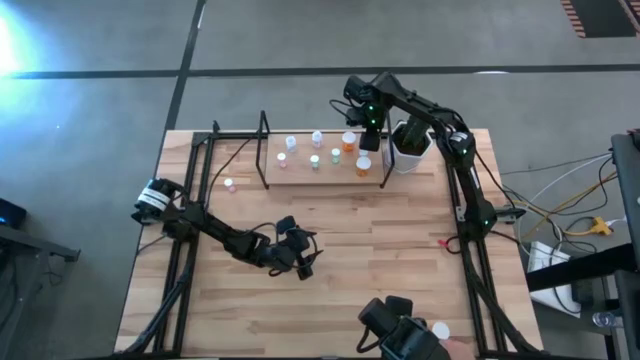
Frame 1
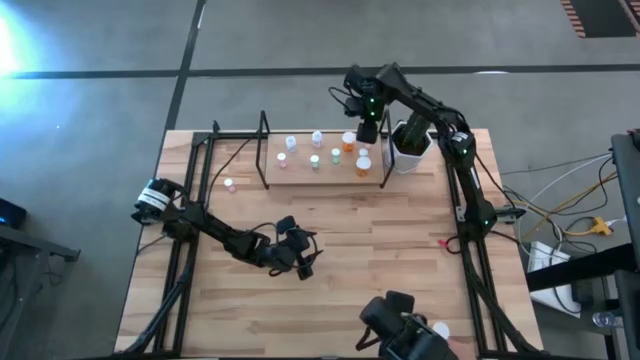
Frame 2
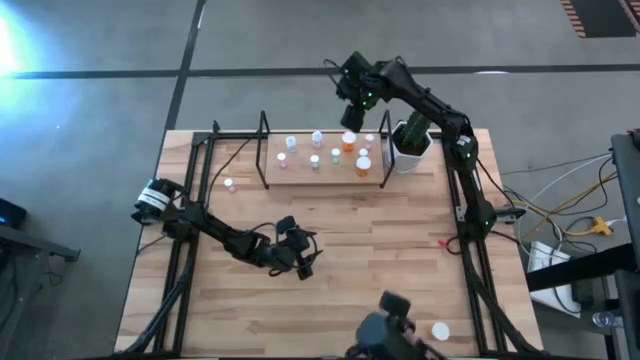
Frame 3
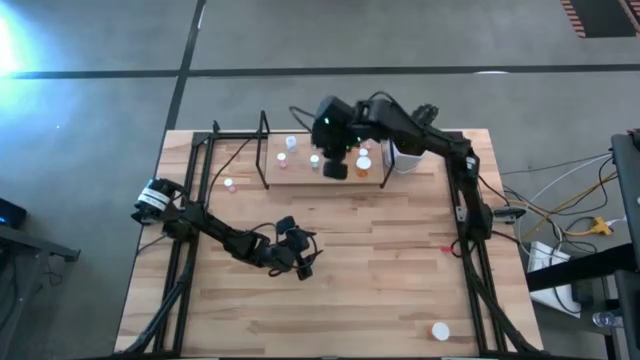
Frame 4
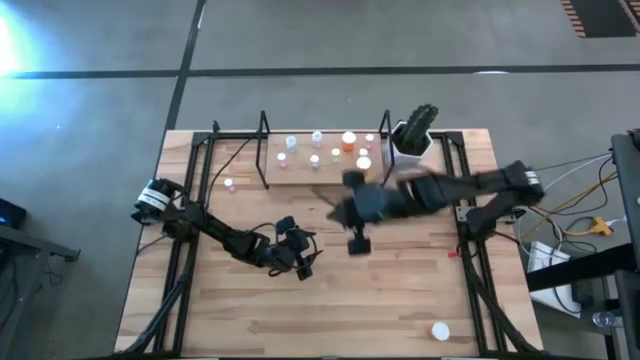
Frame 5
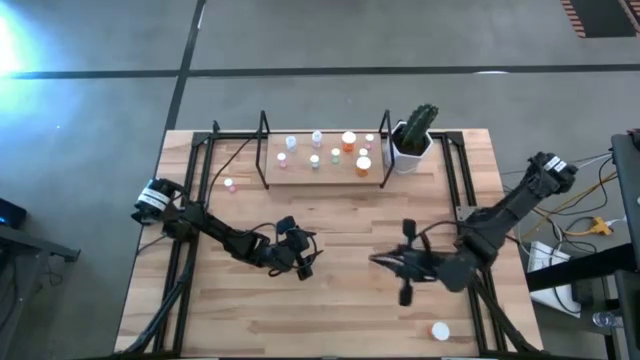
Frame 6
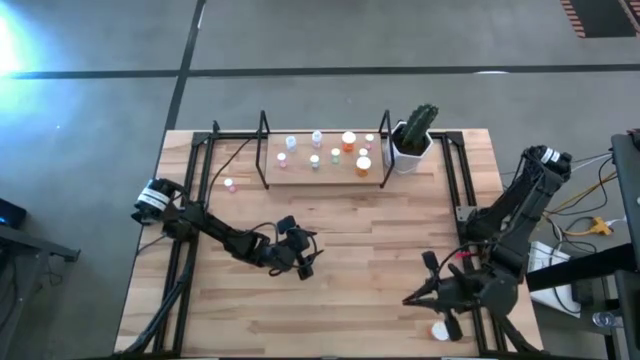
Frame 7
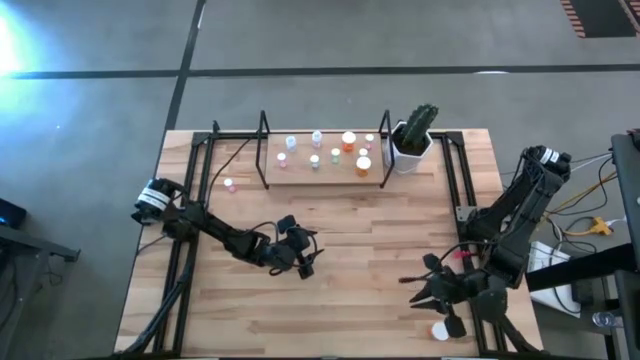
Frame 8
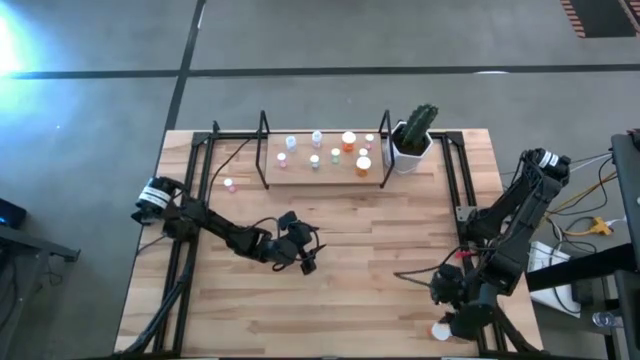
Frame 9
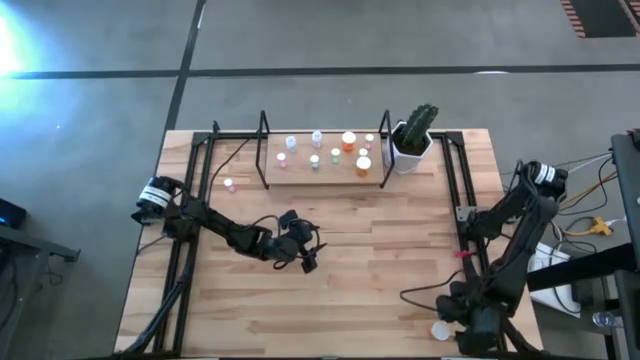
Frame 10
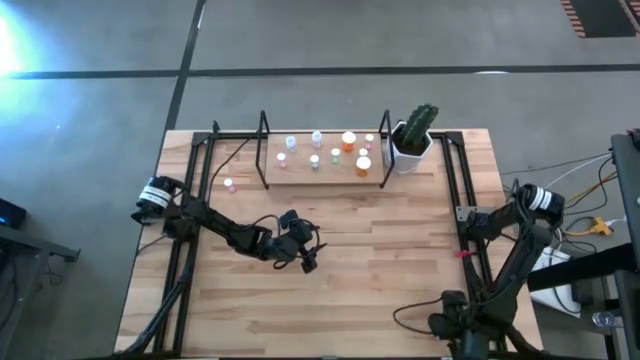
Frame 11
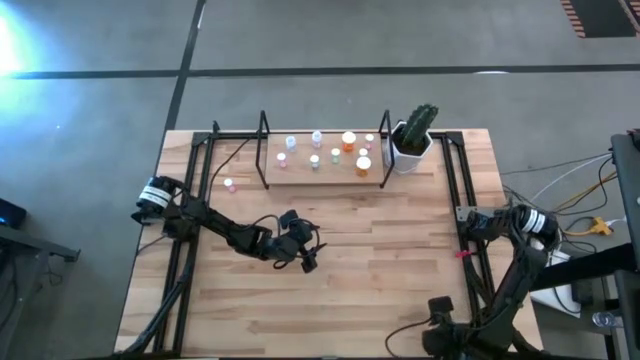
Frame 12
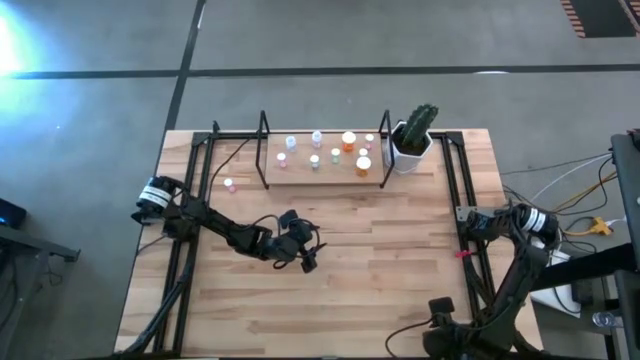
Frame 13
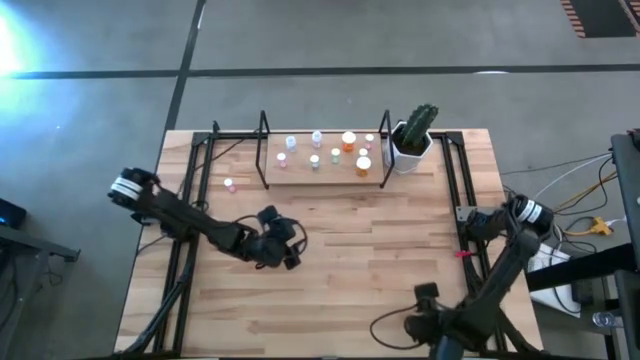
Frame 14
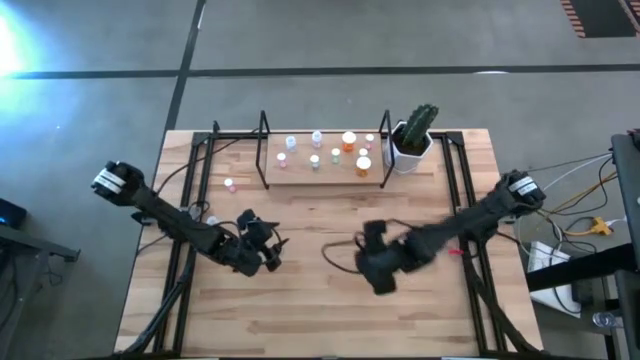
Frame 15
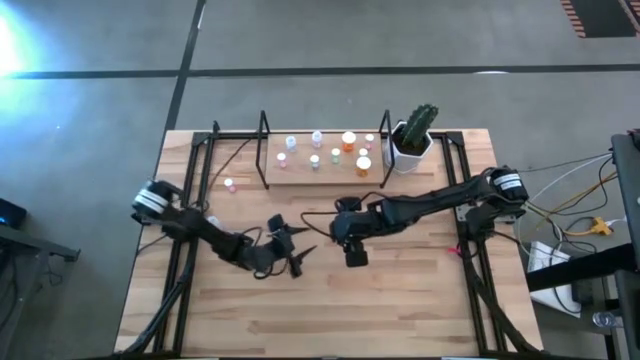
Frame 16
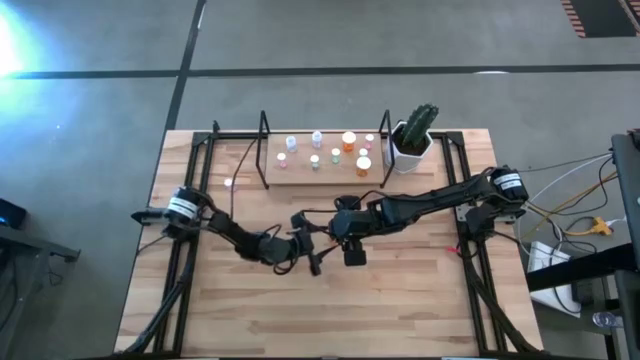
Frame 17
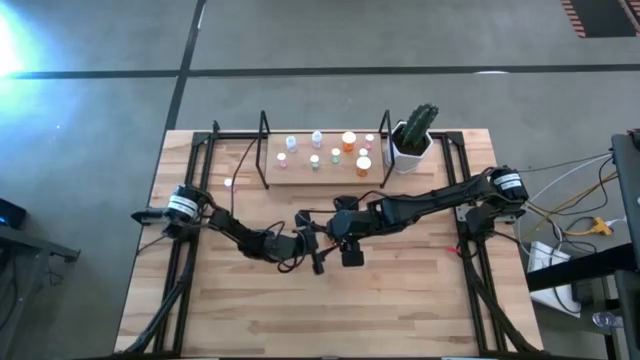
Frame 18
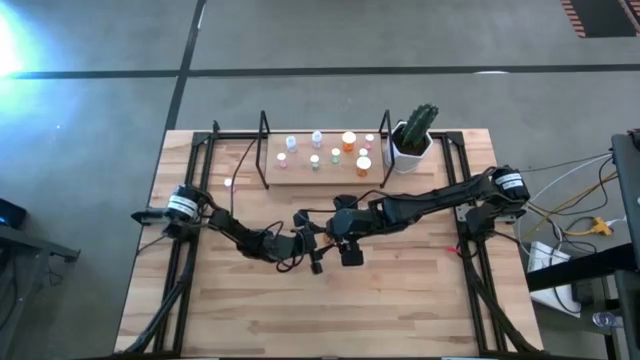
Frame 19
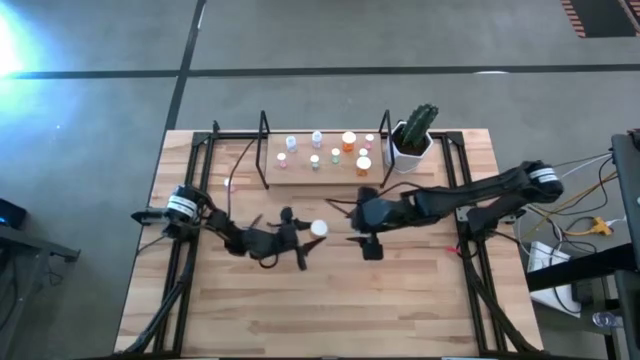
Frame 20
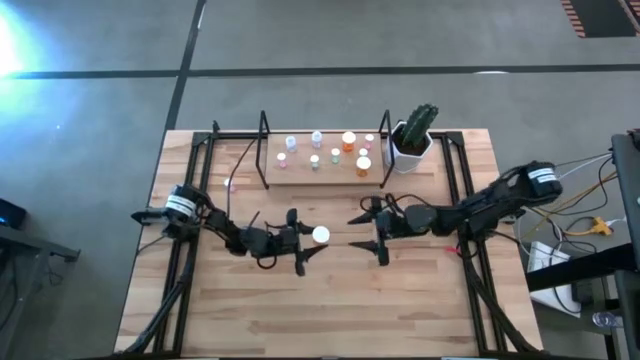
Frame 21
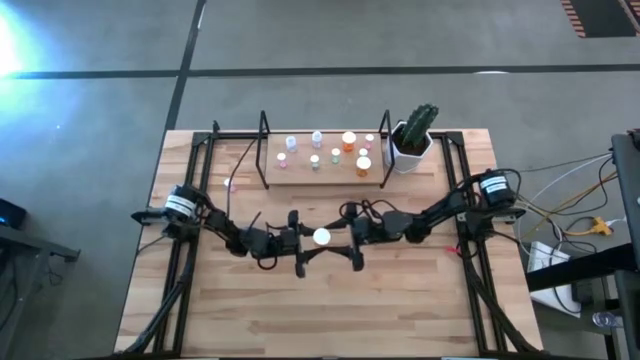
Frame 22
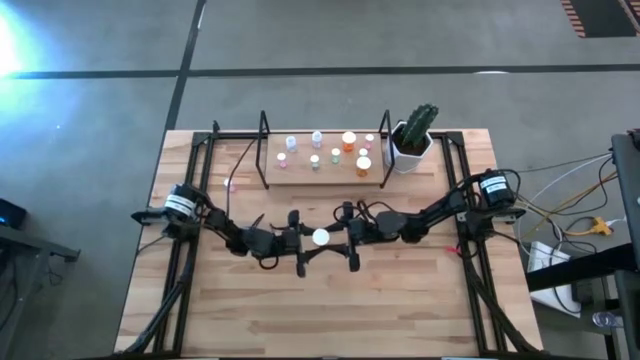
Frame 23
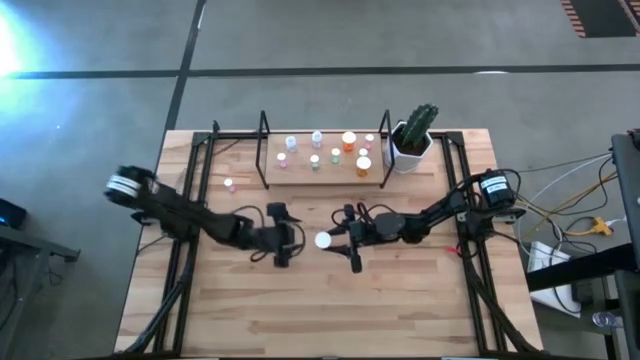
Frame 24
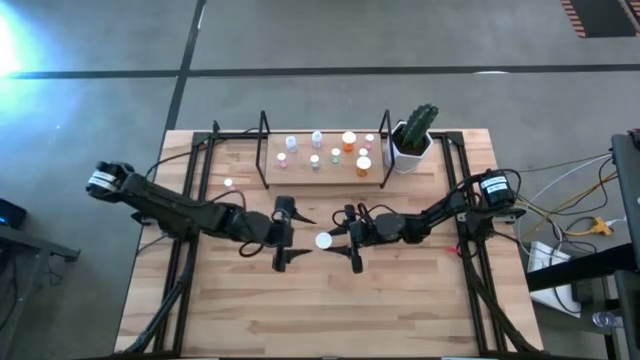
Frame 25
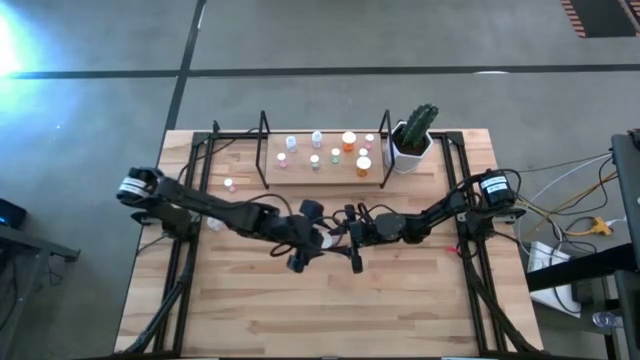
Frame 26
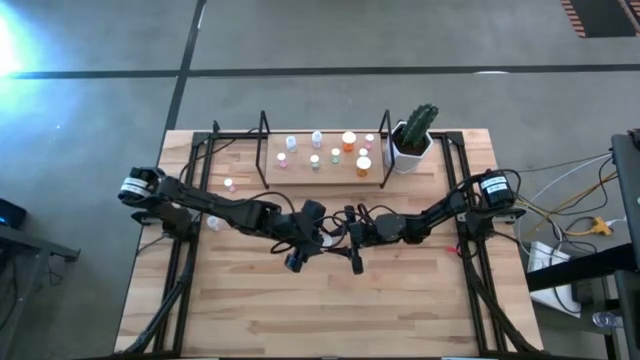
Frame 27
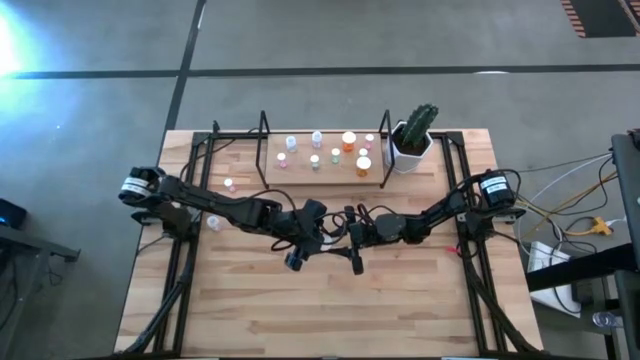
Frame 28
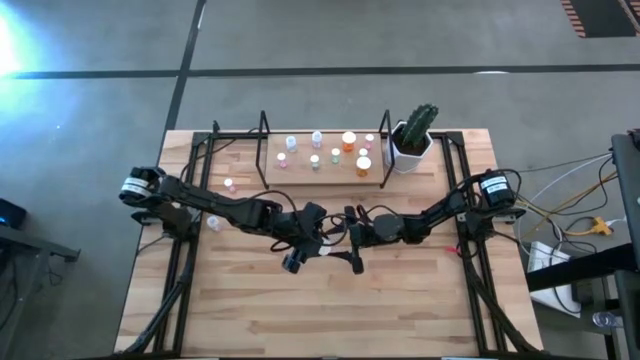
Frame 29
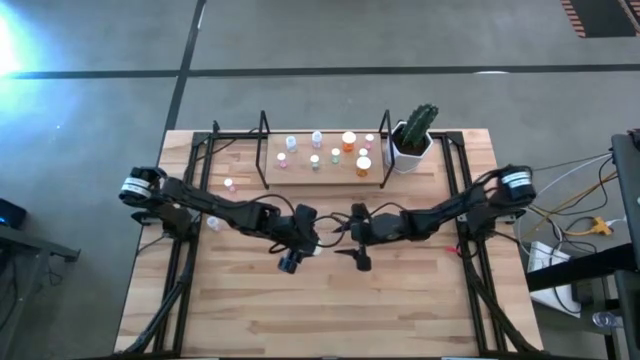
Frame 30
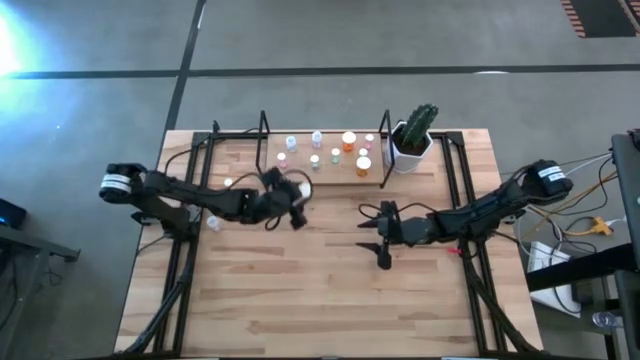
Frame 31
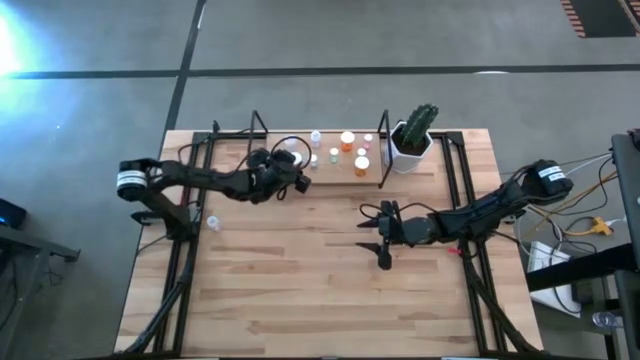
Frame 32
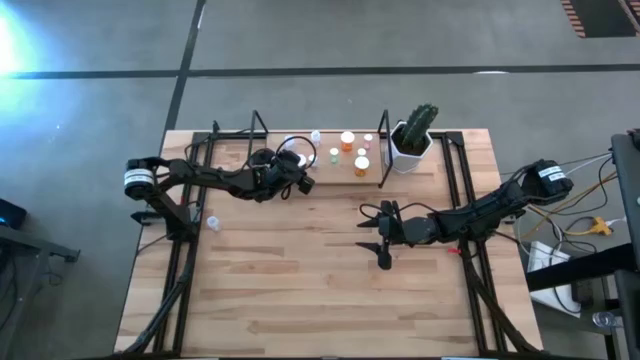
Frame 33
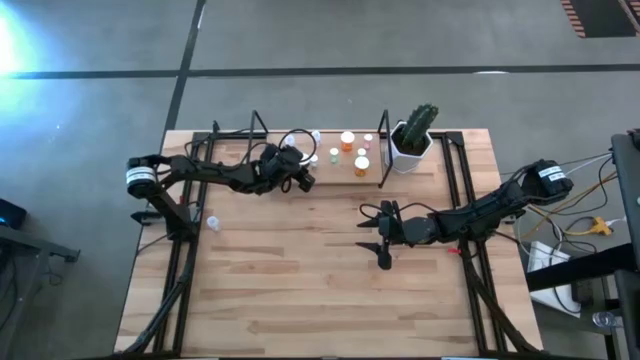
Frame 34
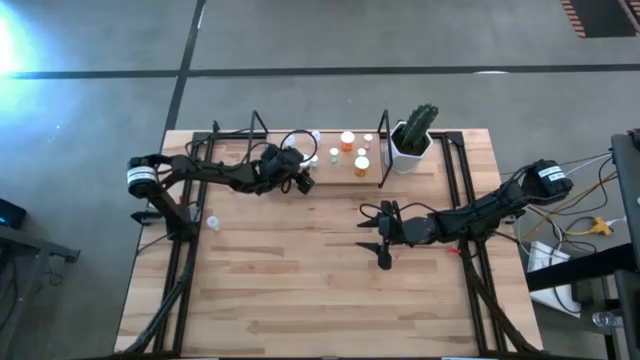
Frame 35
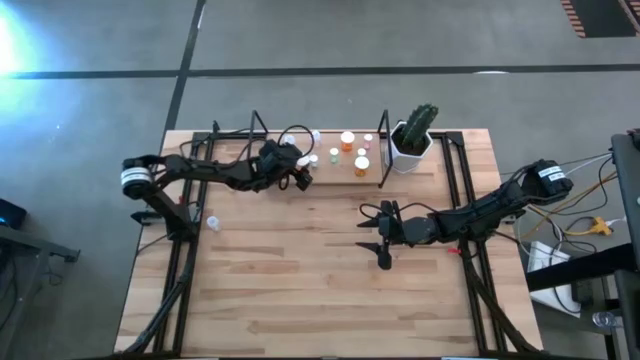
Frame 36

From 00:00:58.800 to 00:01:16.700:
Task: Pick and place medicine bottles onto shelf by color
Put the orange medicine bottle on the shelf

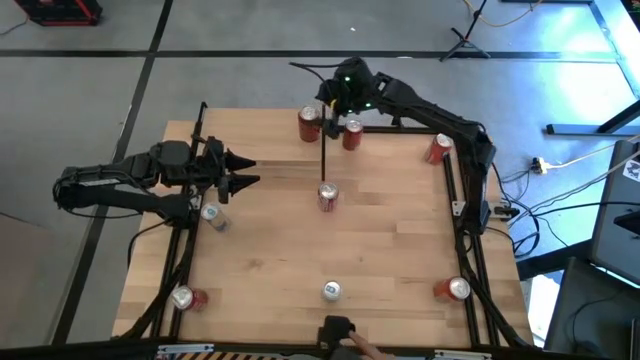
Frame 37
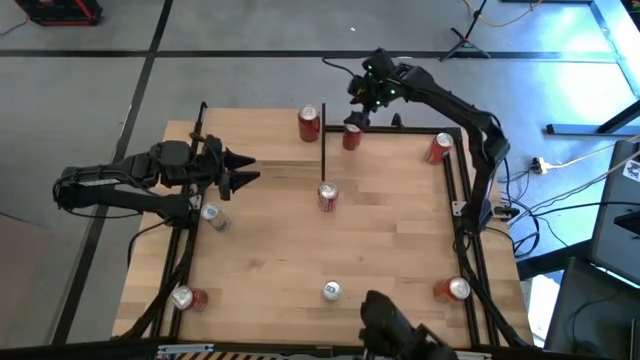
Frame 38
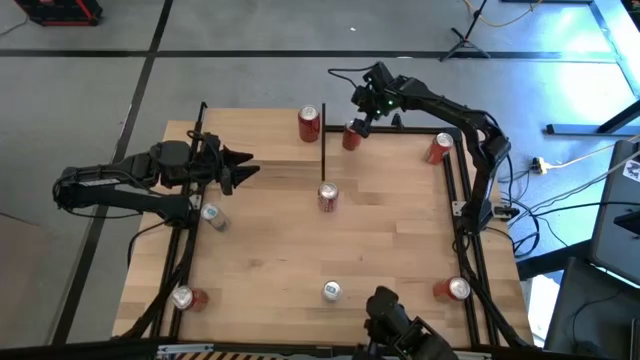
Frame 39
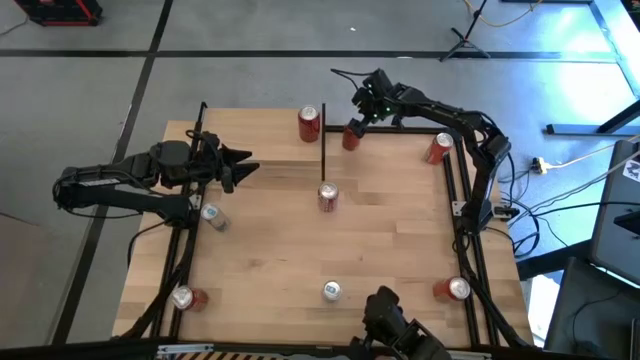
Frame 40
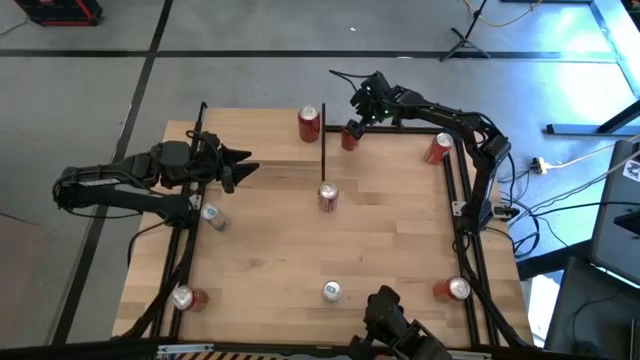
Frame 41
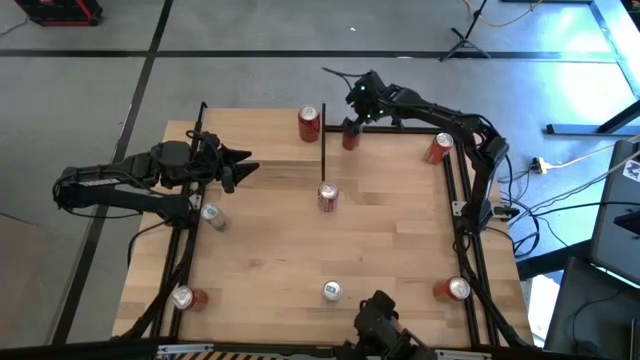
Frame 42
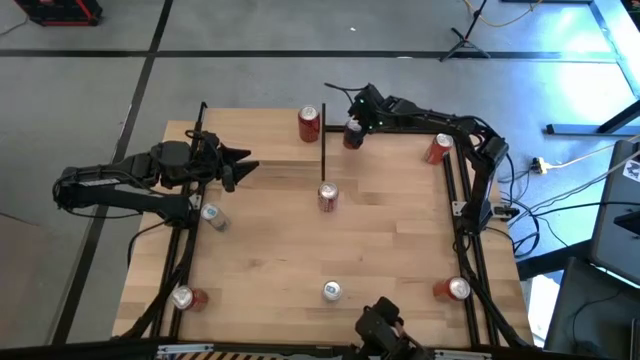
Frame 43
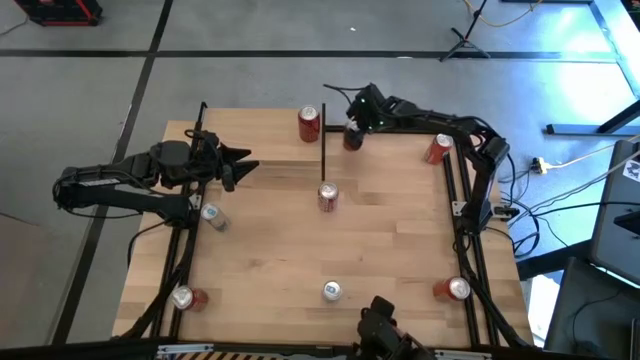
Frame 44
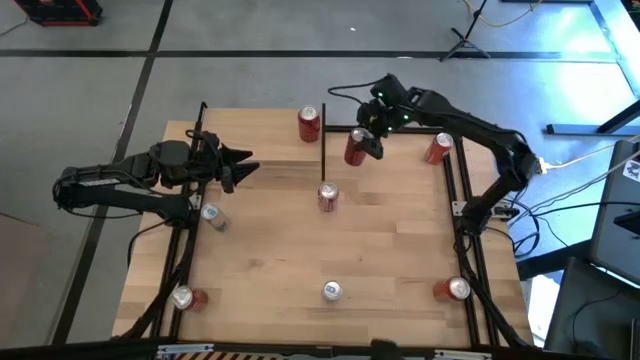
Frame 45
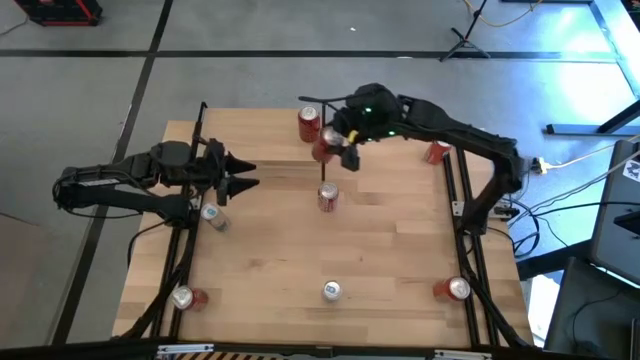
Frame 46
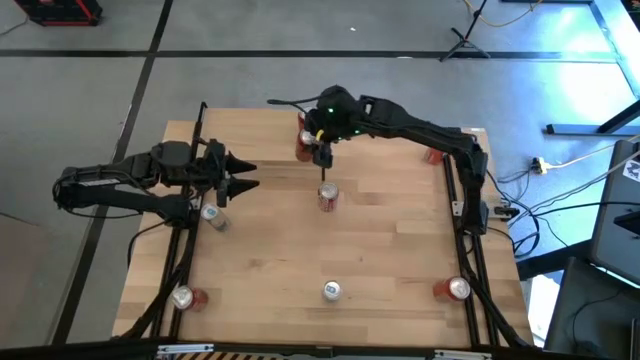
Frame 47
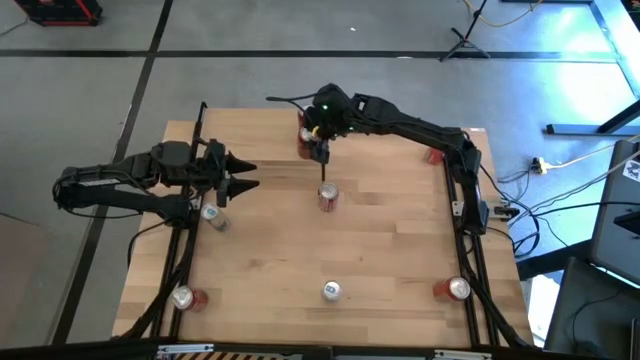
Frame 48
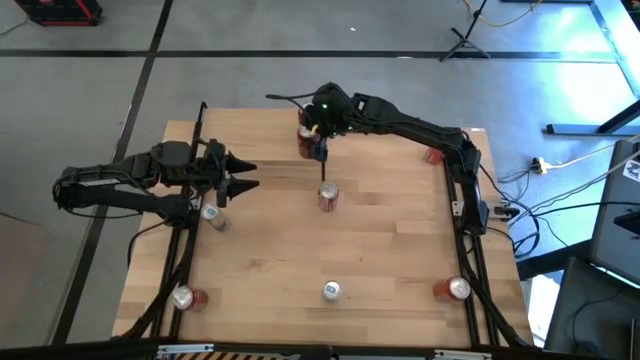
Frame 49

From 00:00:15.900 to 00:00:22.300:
Task: Place canned beverage on shelf
Put the red black soda can on the shelf aligned with the other red black soda can
